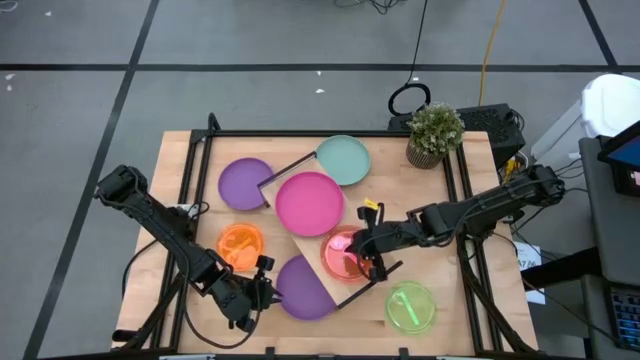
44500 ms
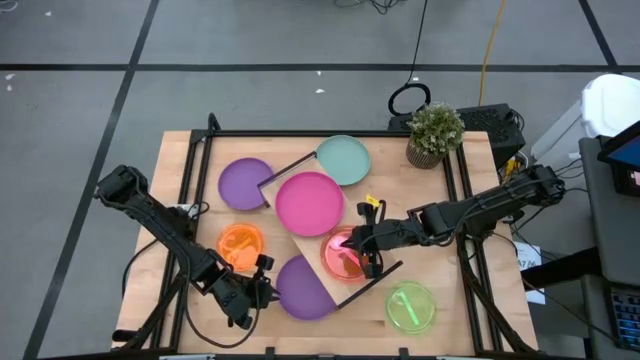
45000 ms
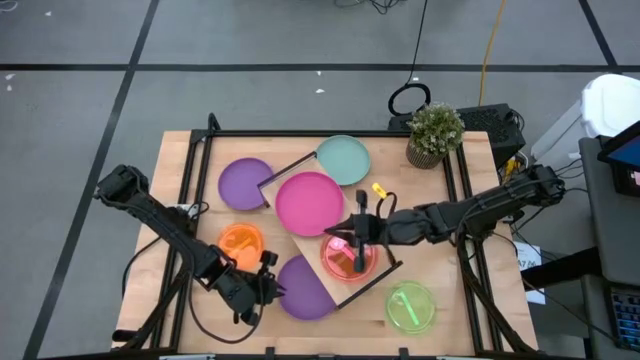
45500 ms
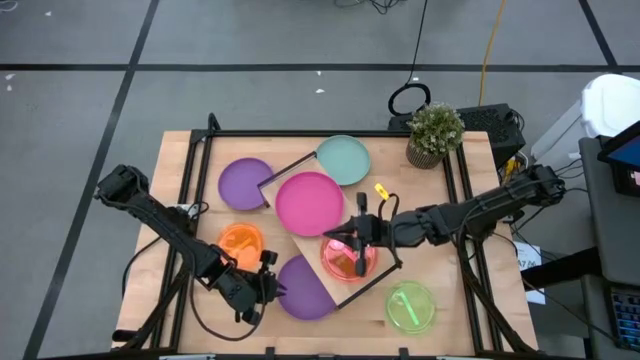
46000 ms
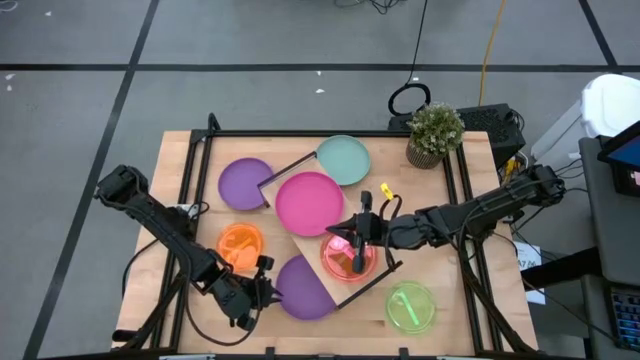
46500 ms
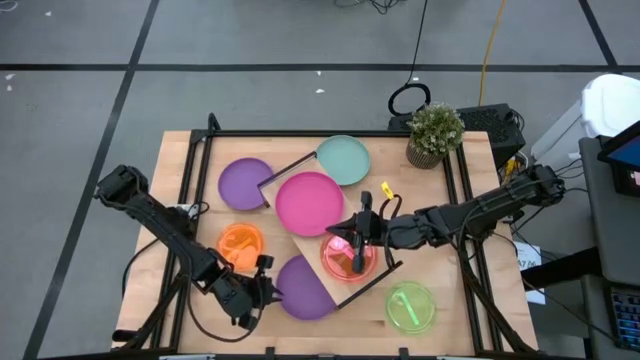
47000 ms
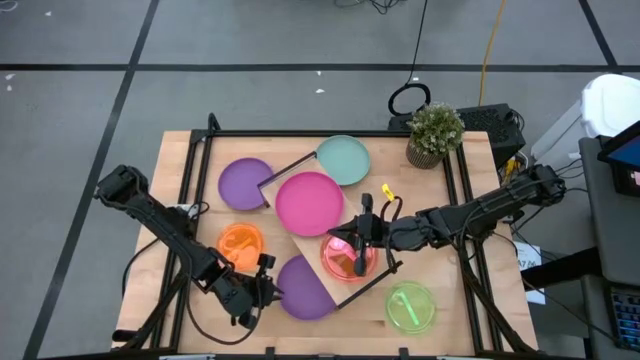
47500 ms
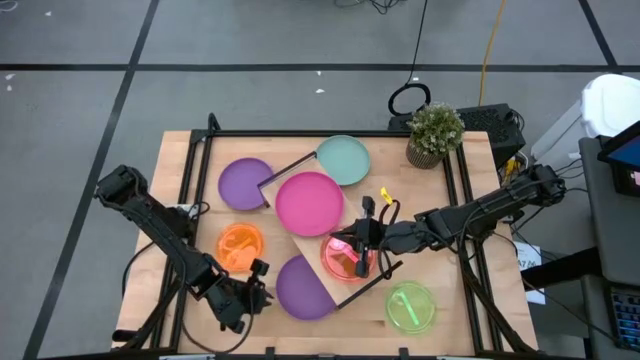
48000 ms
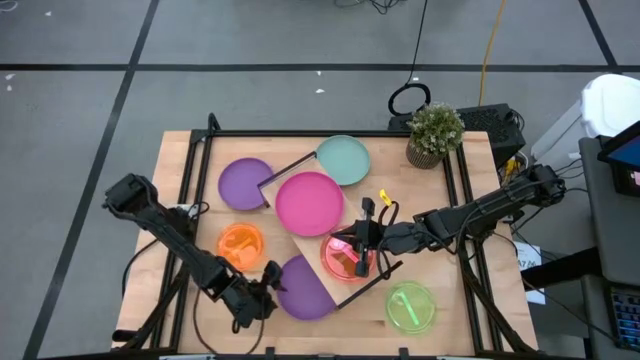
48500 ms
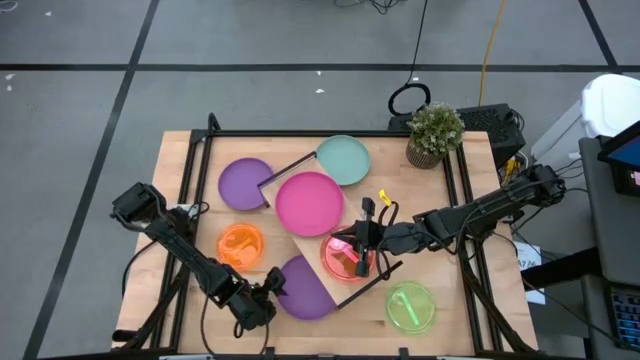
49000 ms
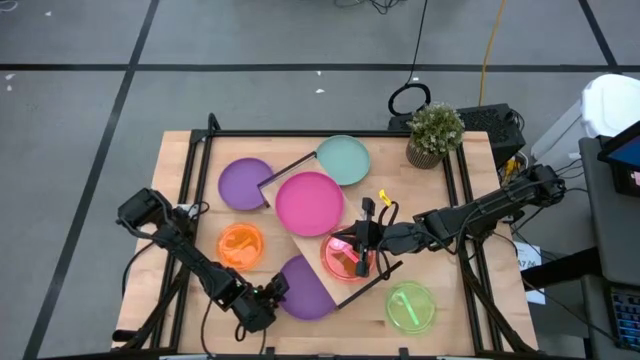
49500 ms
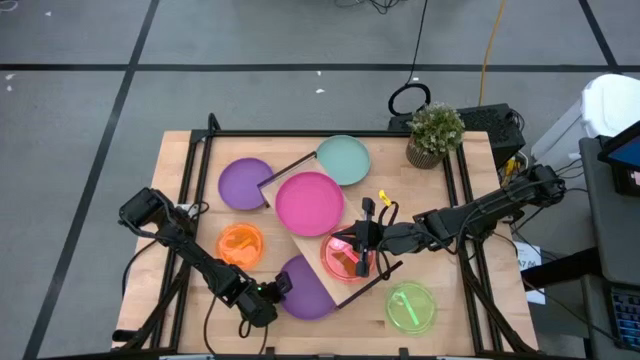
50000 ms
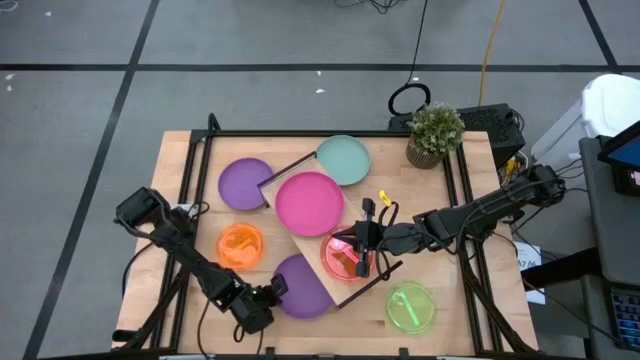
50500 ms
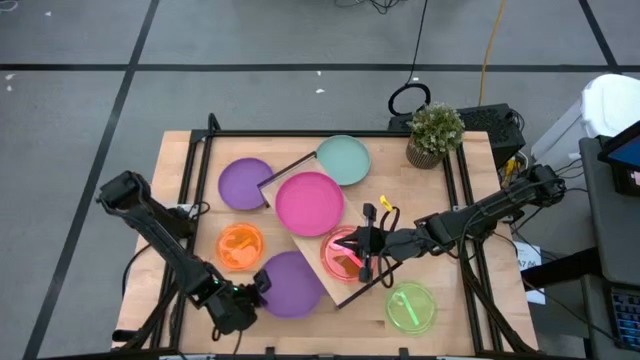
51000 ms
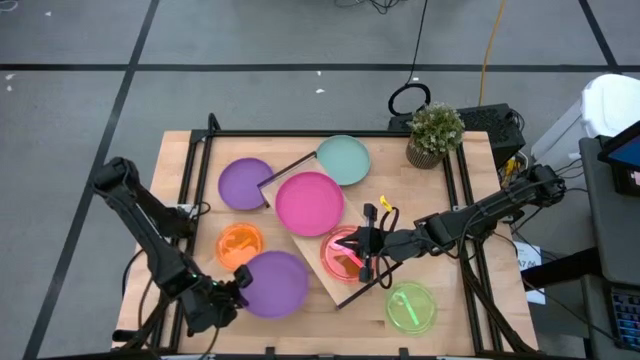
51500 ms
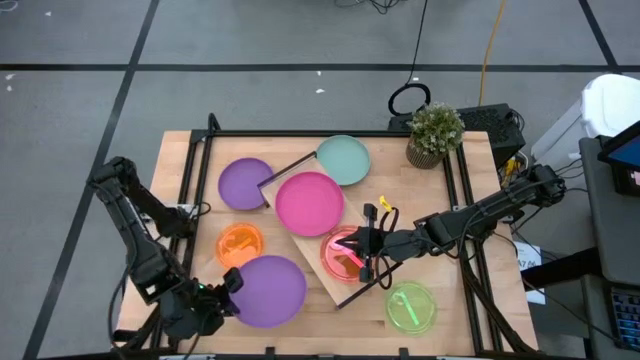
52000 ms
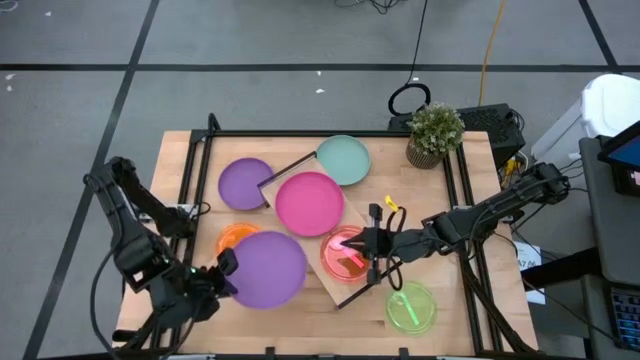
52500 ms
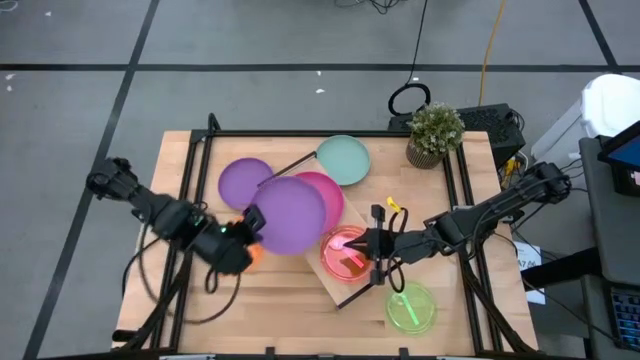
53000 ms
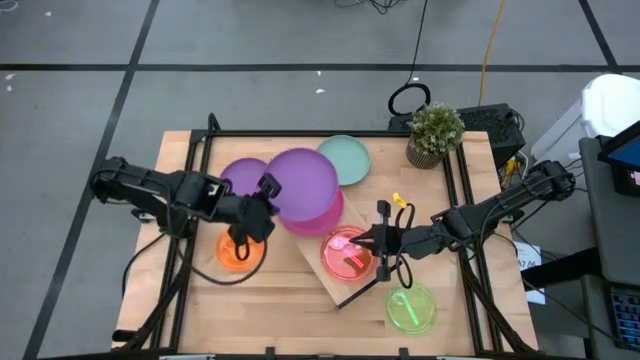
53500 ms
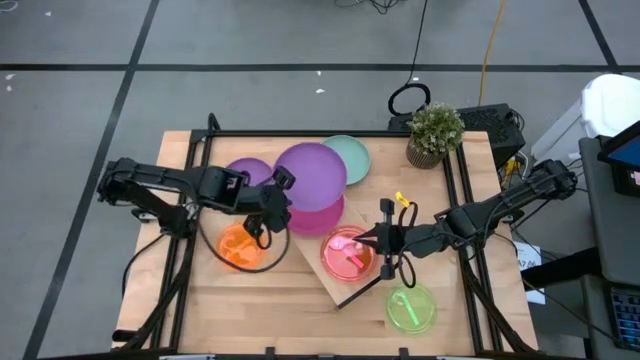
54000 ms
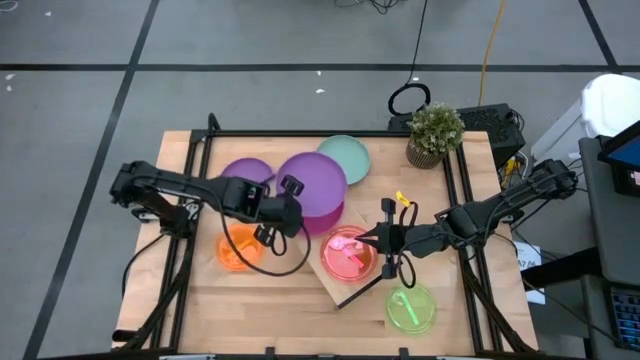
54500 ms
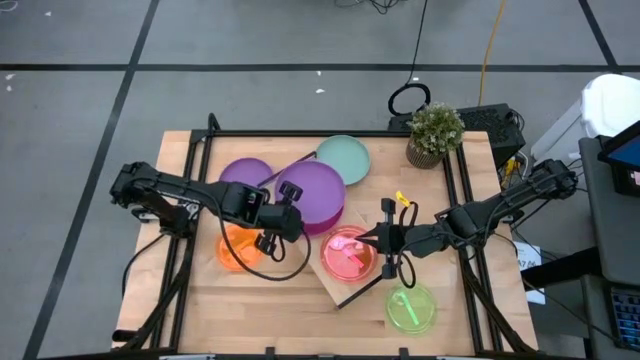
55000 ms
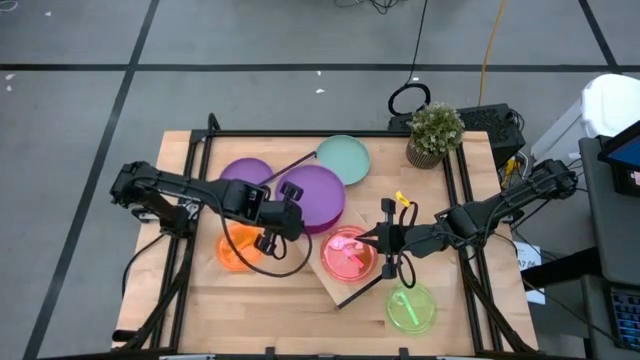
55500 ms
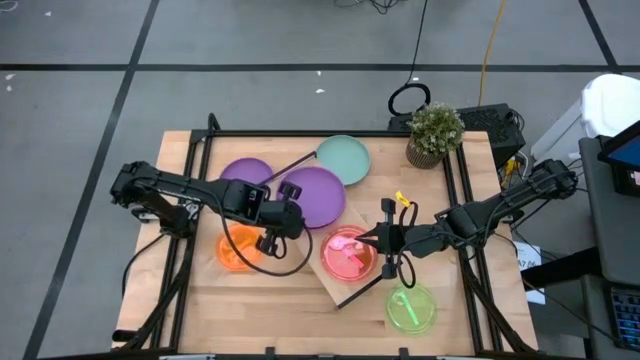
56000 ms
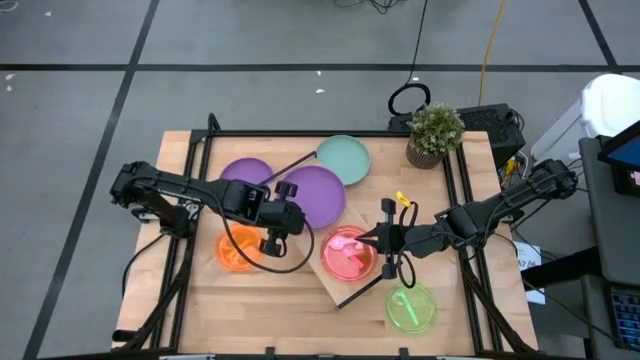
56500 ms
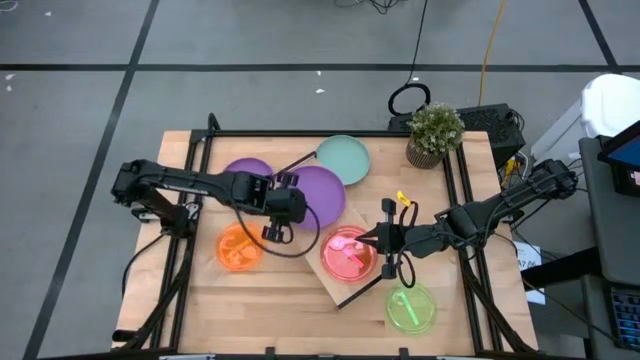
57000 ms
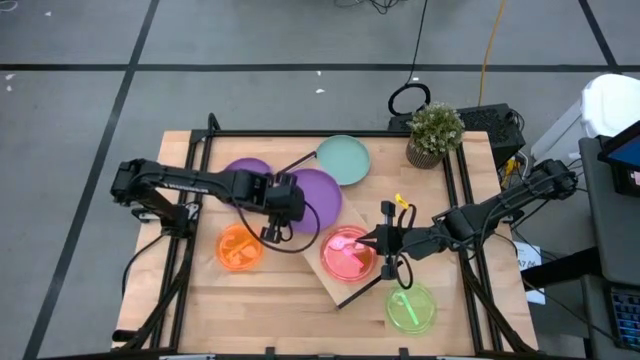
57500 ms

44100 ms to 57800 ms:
Task: Place and stack plates onto a shelf
Stack the bottom purple plate on top of the pink plate on the shelf

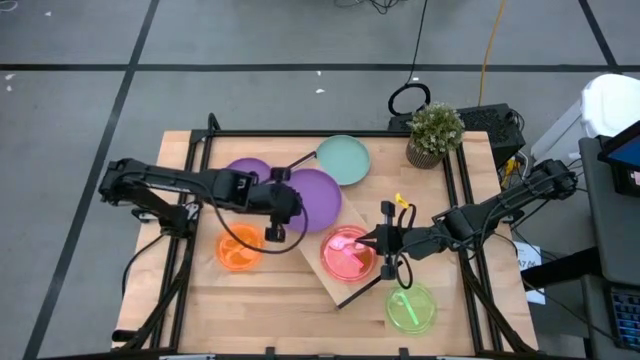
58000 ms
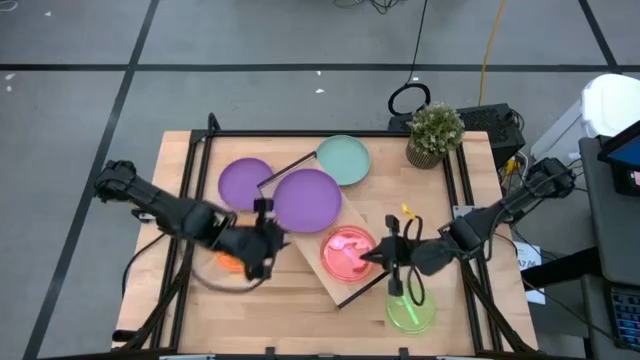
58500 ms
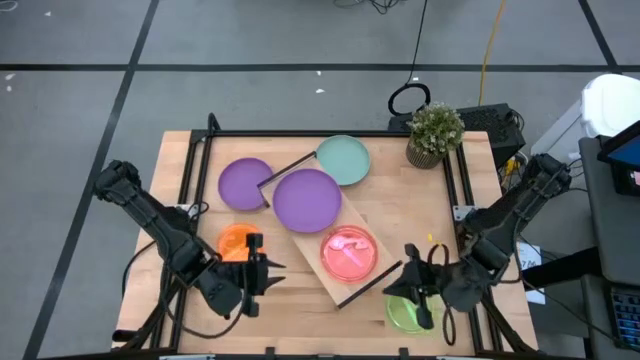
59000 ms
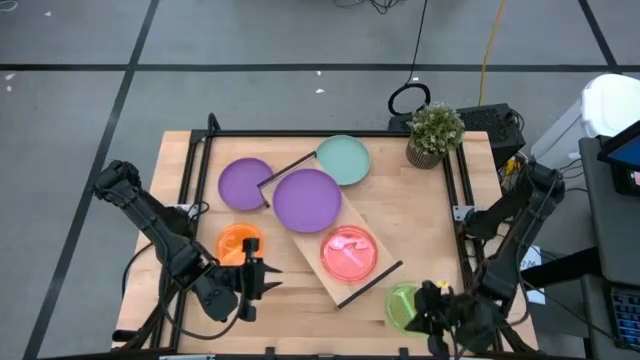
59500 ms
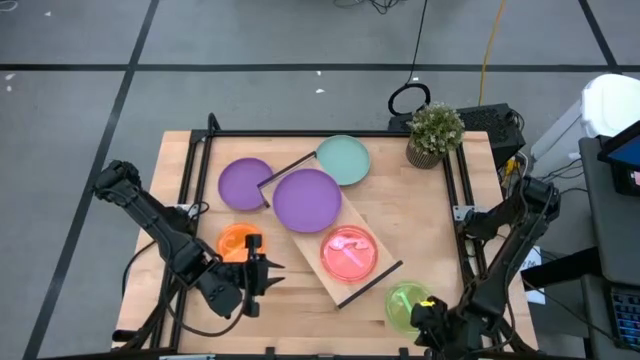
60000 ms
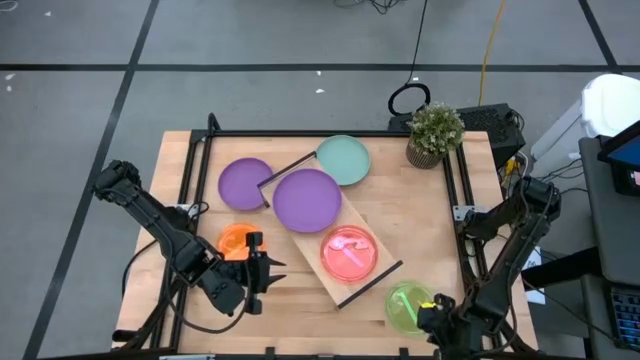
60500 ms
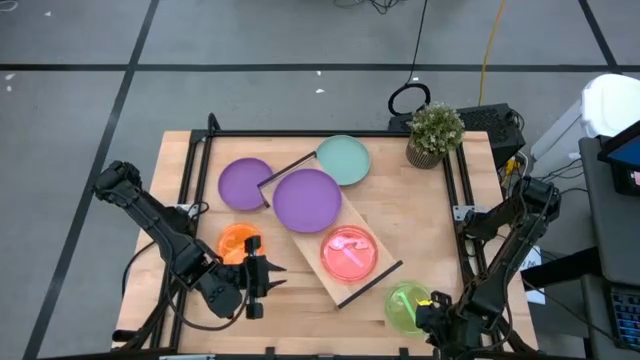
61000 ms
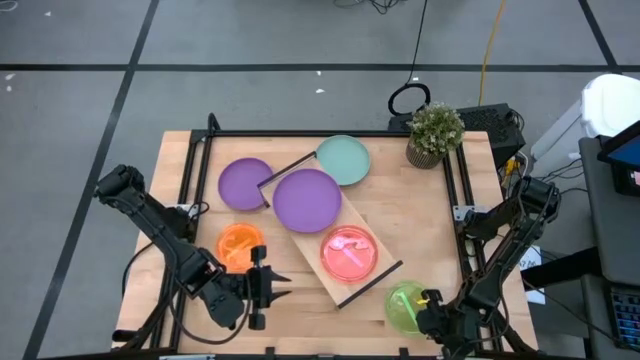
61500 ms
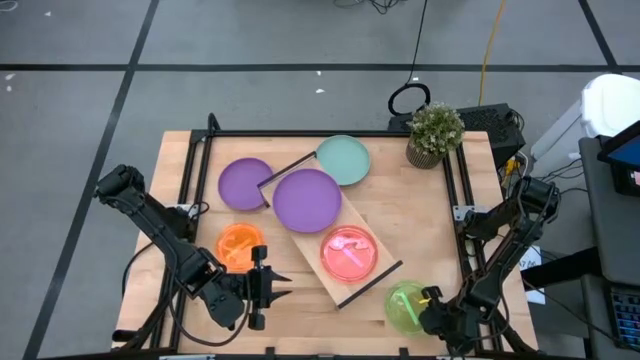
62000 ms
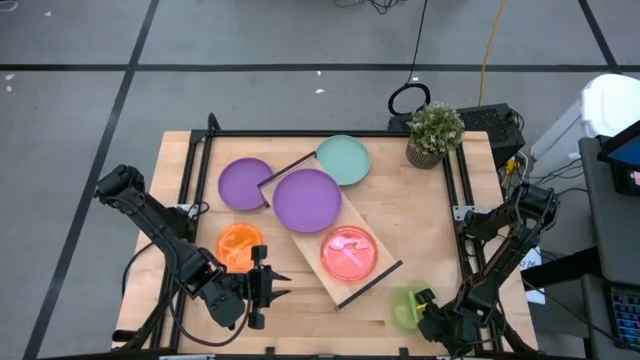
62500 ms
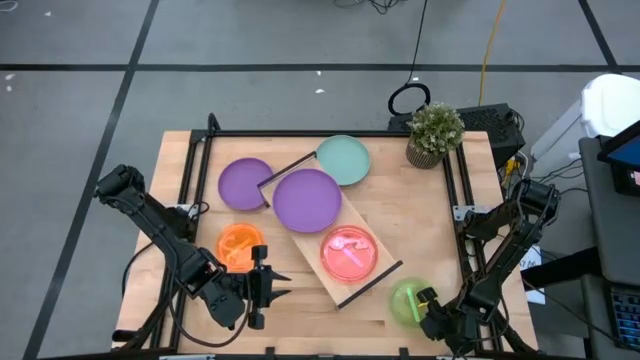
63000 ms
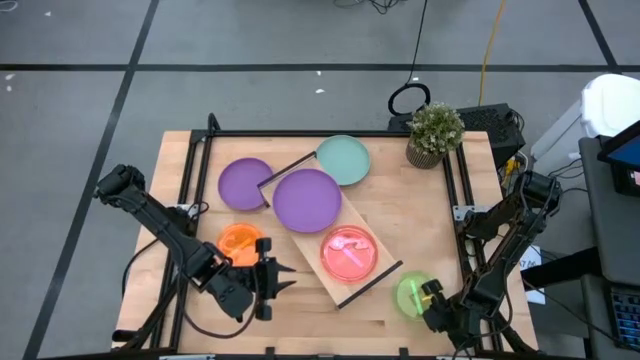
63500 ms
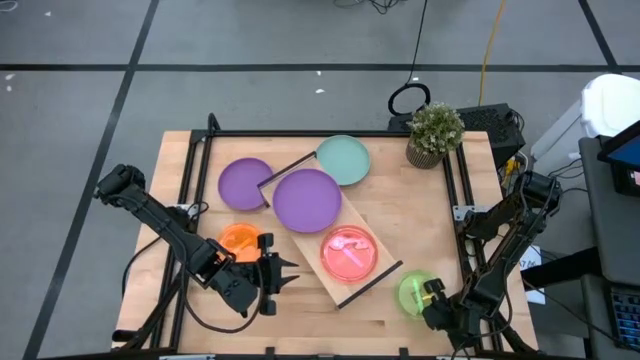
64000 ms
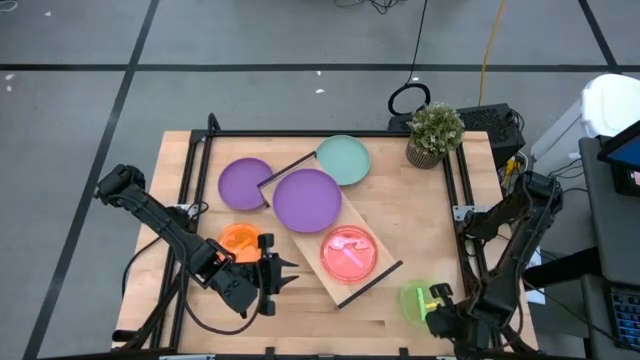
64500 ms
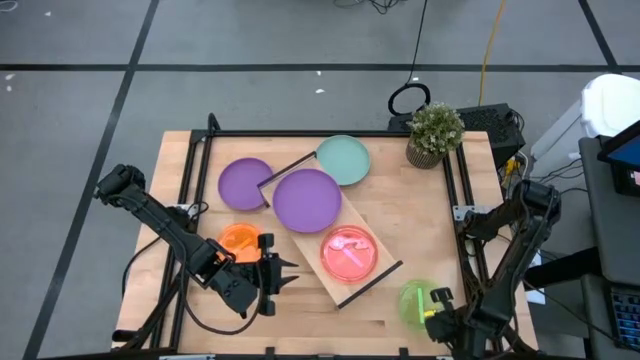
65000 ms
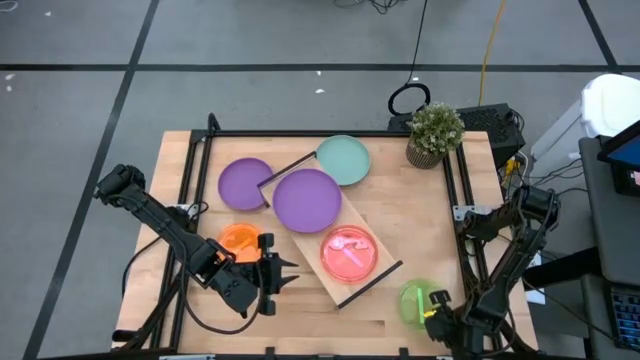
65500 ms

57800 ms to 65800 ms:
Stack the green plate on top of the pink plate on the shelf
